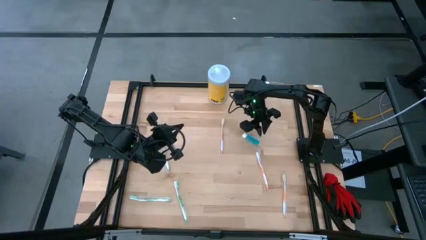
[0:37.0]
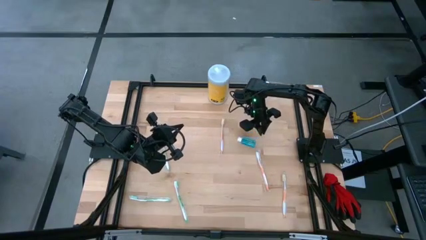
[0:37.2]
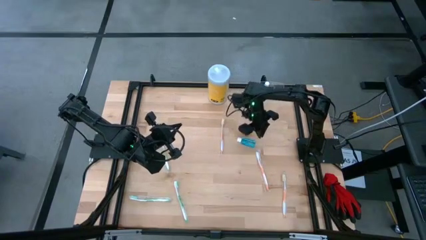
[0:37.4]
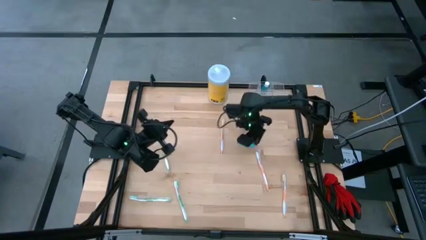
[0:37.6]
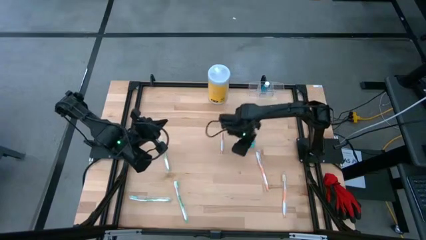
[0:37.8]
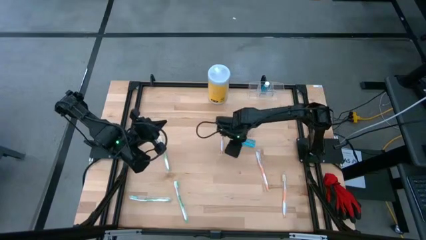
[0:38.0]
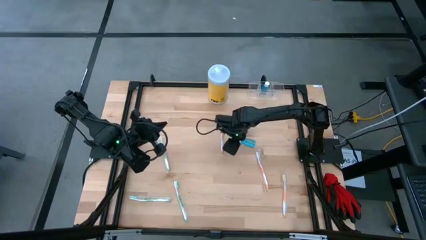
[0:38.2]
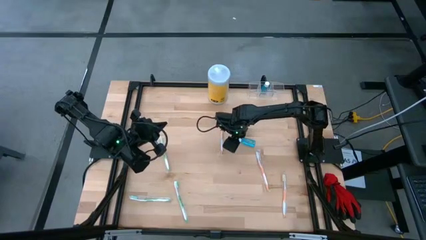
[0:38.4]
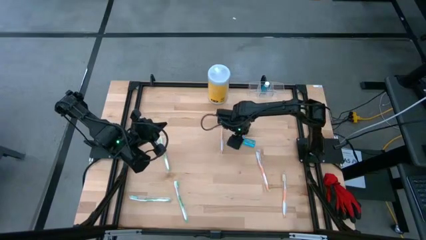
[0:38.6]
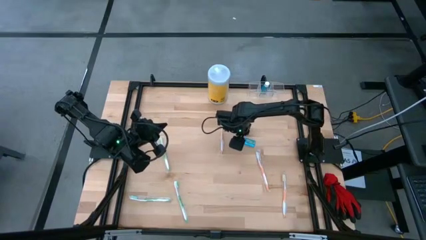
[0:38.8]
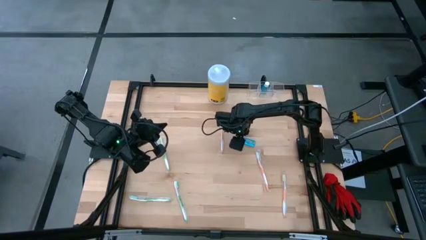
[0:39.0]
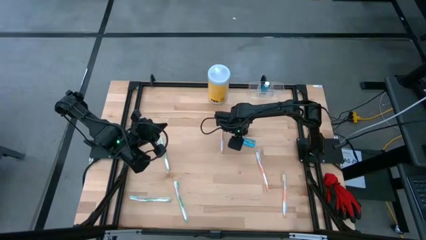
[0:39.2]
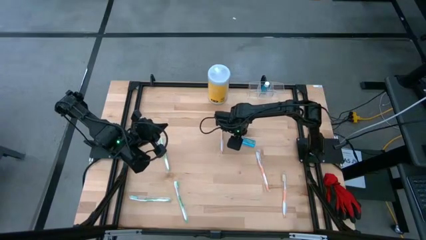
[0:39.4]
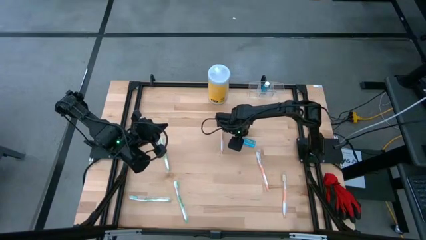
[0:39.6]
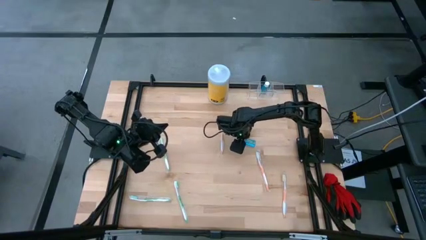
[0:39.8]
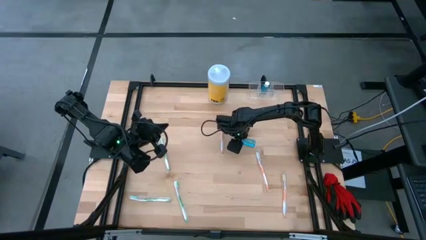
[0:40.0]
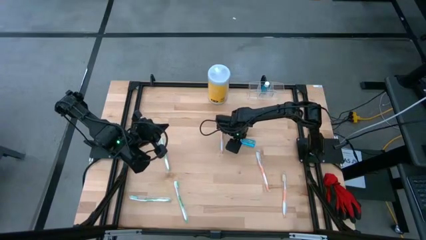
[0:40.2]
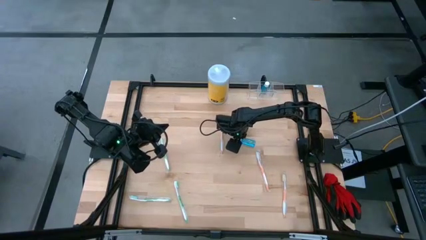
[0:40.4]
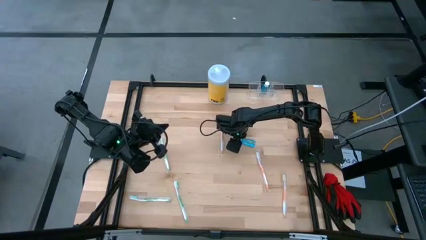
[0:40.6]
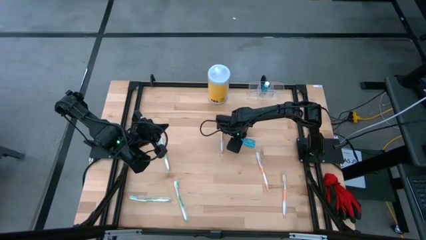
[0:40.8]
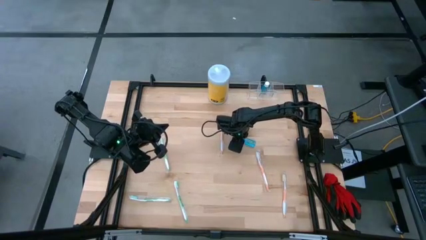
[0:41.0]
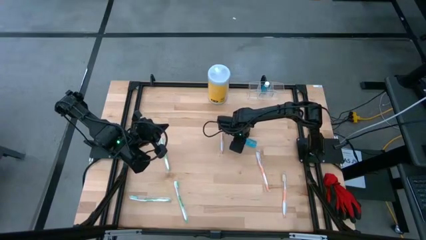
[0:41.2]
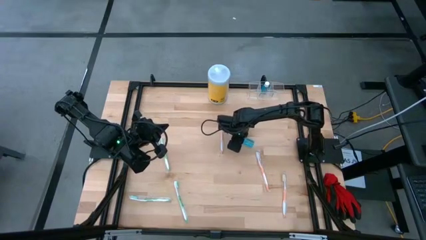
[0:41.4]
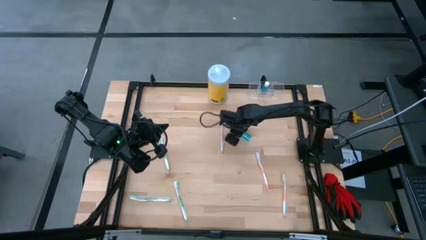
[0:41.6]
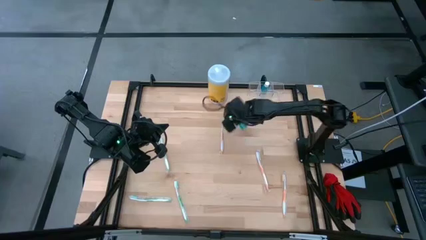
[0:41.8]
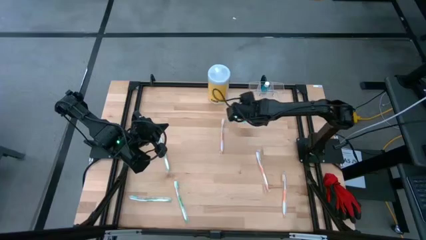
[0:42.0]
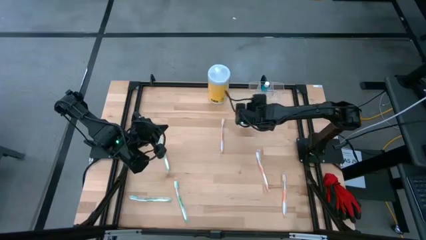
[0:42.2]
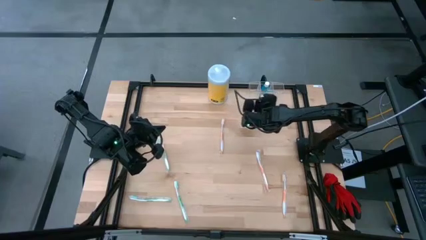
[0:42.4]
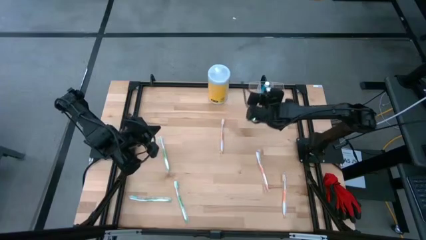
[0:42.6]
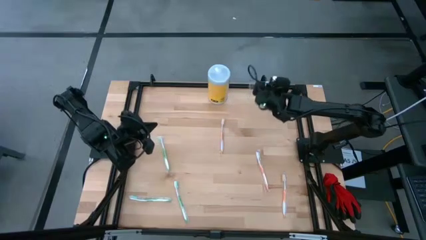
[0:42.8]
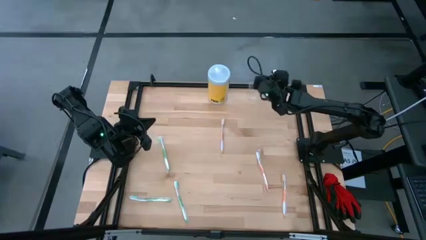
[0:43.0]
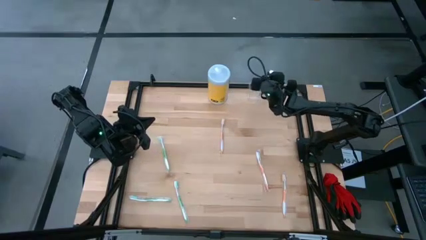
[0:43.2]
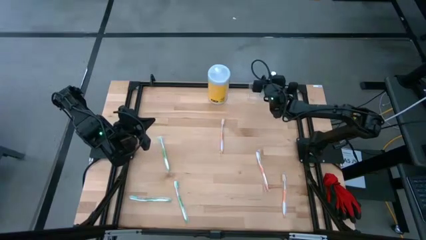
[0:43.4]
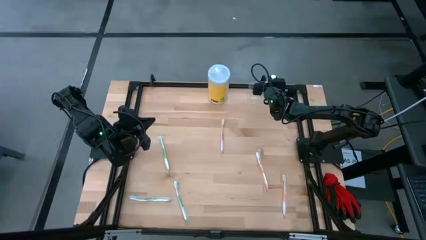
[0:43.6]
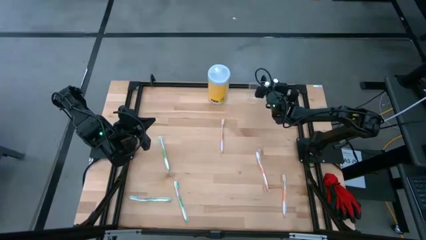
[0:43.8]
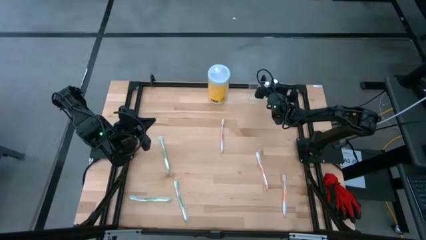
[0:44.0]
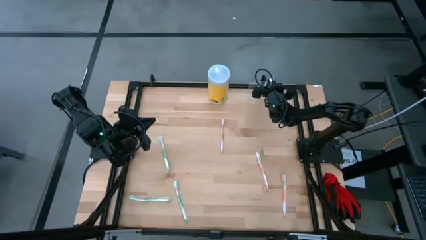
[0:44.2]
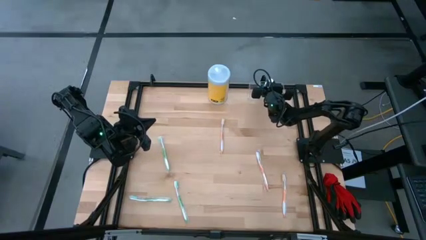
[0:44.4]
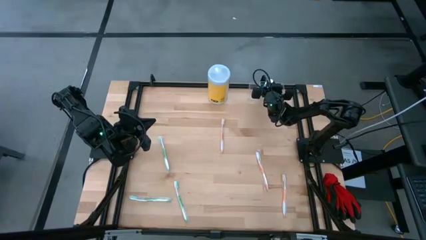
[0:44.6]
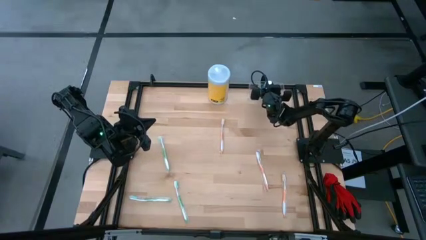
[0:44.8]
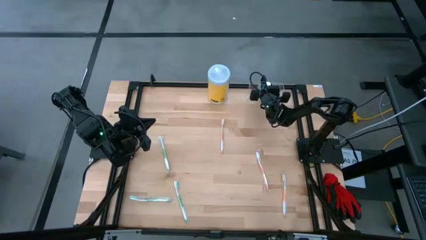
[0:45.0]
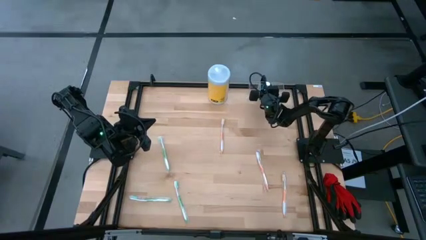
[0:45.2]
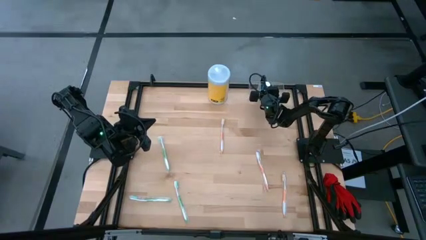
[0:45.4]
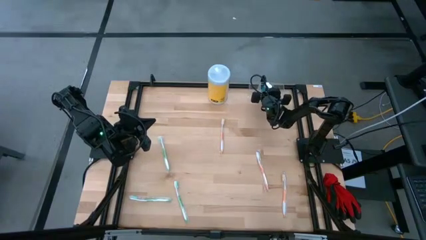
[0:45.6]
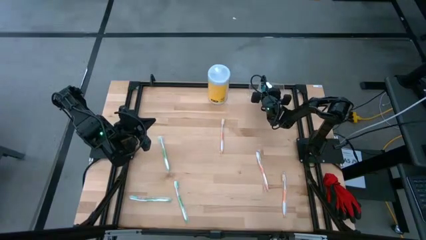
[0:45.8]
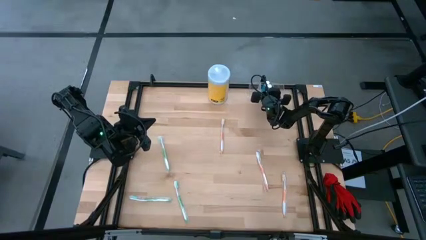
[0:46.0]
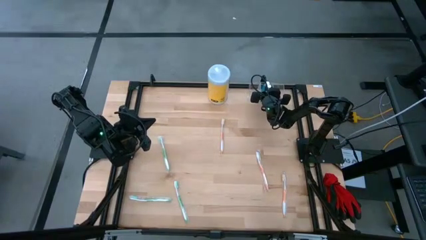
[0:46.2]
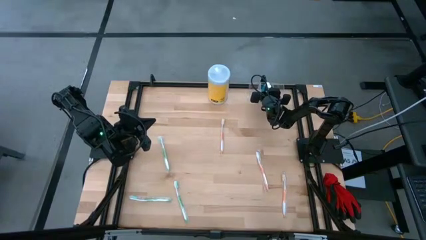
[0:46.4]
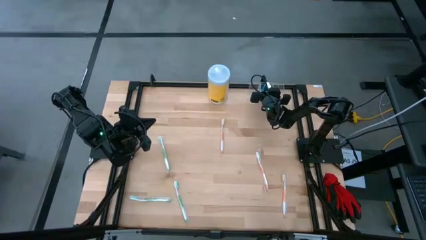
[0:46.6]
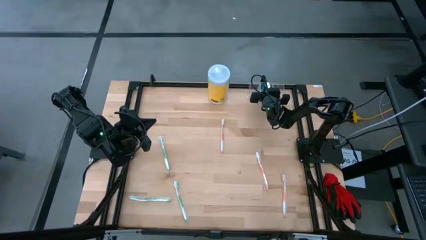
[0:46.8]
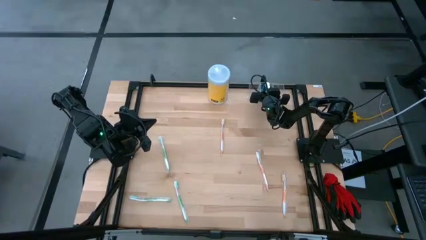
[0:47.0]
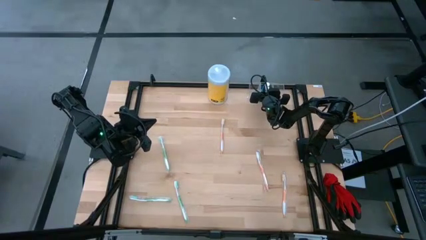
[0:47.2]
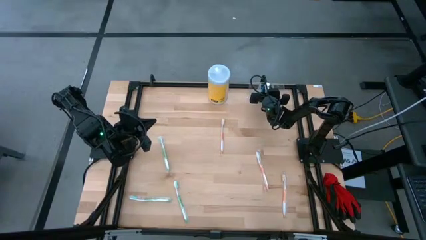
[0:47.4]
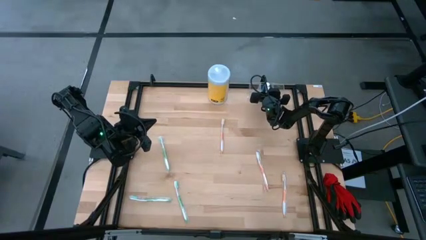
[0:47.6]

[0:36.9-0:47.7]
Task: Pick & Place toothbrushing station
Put the blue mouthwash into the transparent organizer

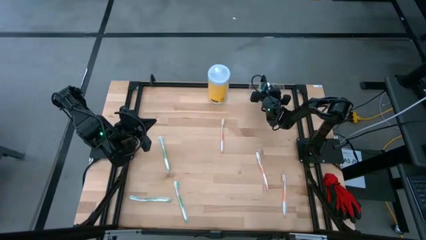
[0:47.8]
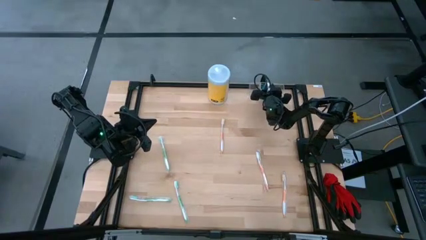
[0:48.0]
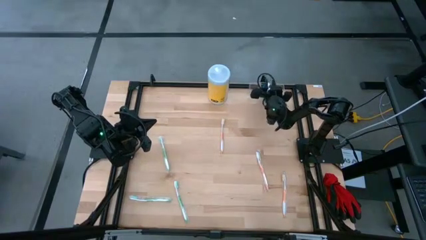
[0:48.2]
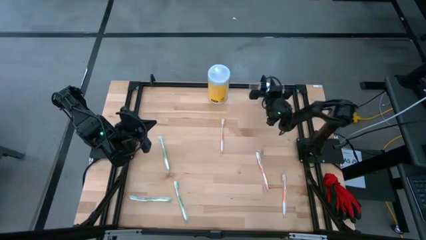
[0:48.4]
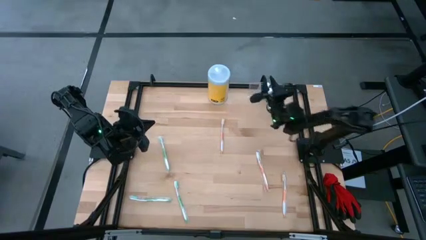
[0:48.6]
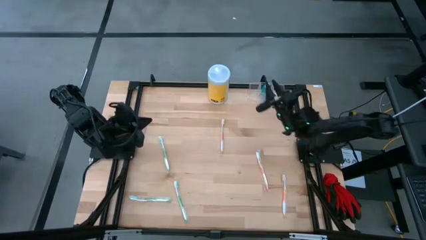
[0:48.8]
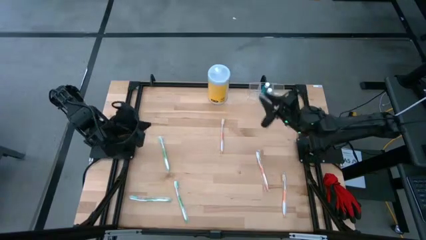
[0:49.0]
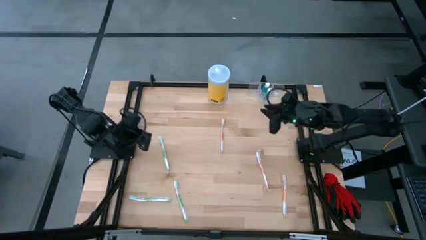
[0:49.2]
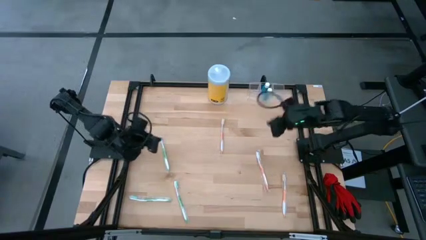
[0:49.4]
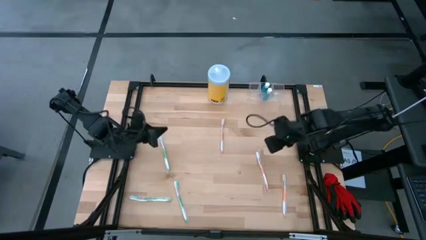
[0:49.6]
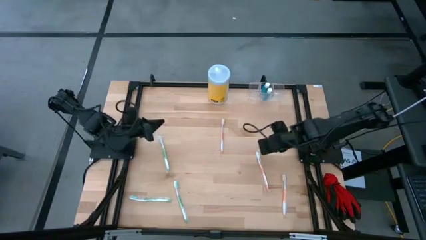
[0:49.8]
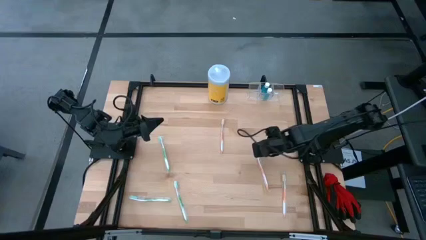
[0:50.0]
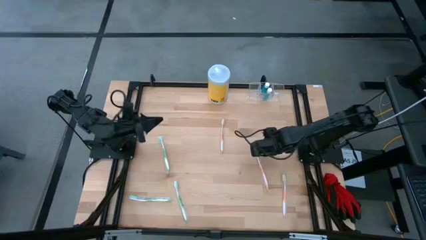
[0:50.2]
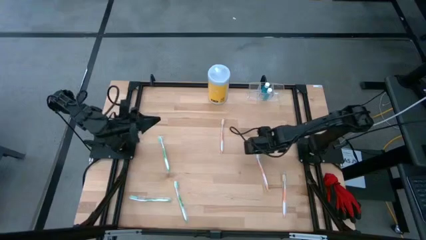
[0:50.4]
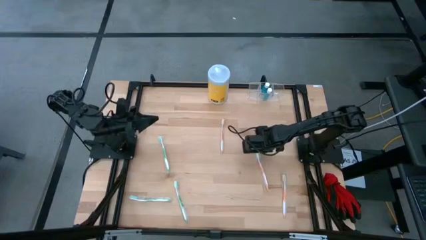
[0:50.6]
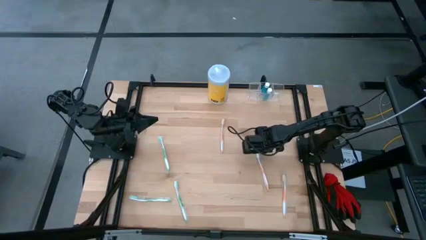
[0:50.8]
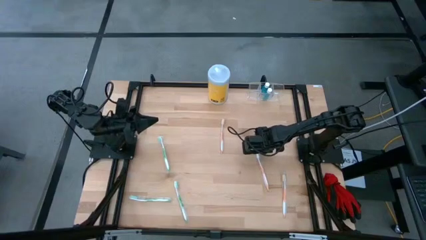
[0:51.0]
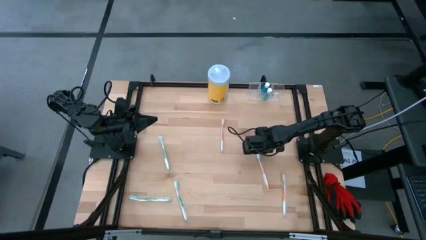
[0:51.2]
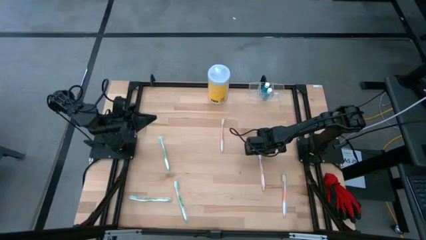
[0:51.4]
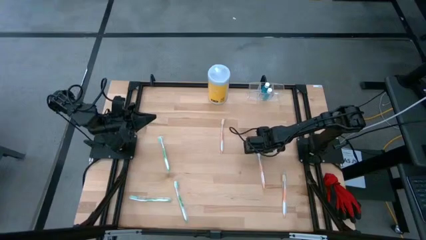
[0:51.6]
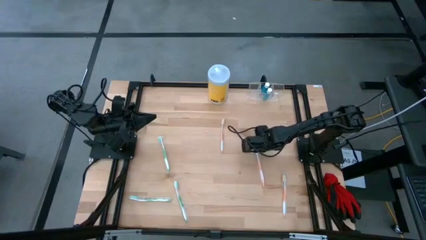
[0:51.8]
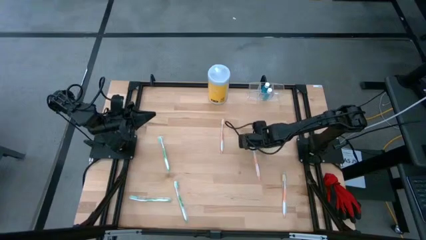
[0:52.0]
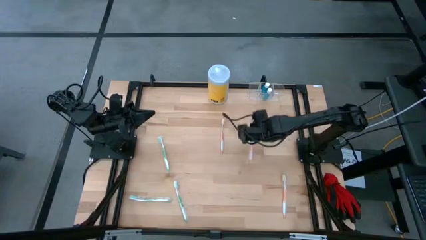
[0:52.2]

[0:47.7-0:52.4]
Put the middle orange toothbrush into the transparent organizer

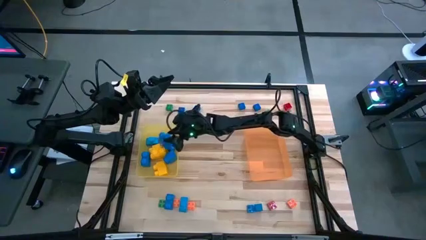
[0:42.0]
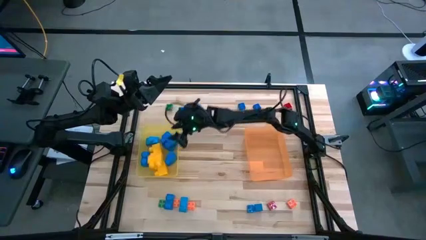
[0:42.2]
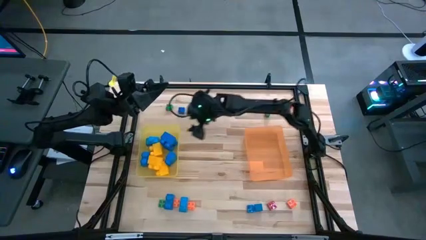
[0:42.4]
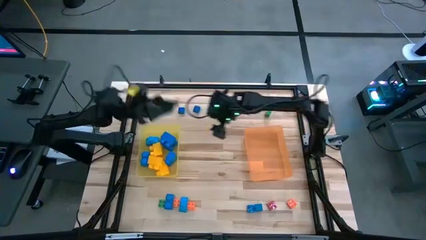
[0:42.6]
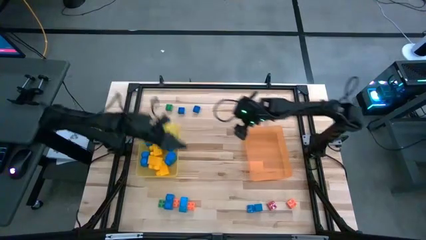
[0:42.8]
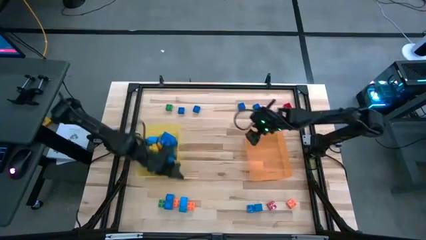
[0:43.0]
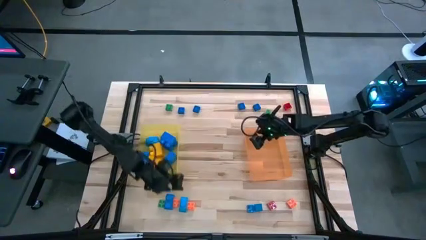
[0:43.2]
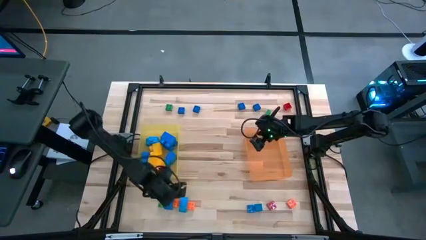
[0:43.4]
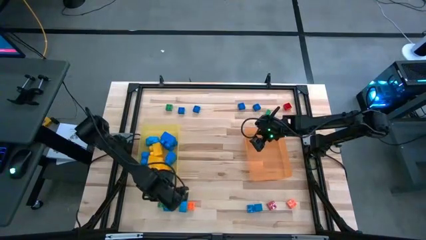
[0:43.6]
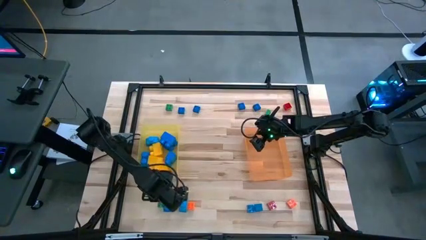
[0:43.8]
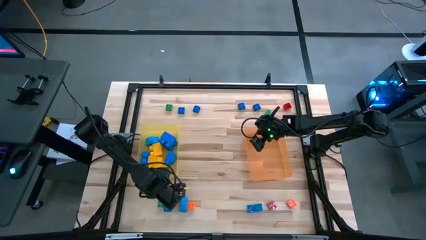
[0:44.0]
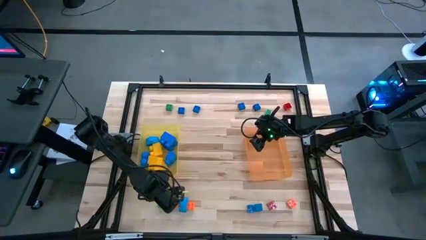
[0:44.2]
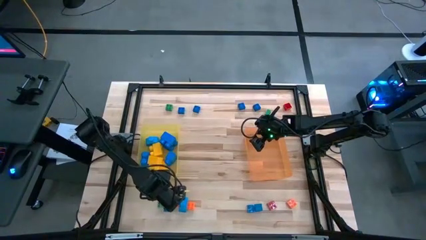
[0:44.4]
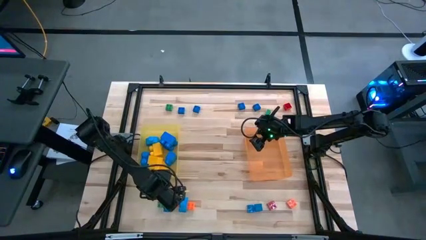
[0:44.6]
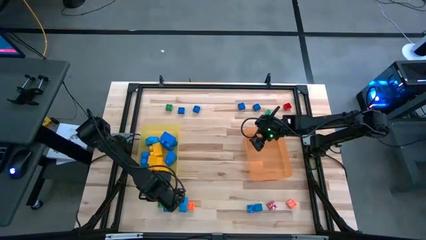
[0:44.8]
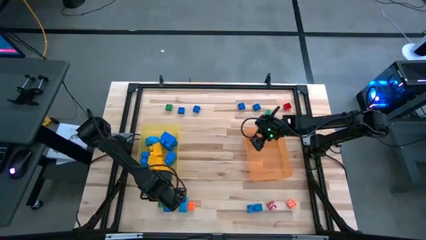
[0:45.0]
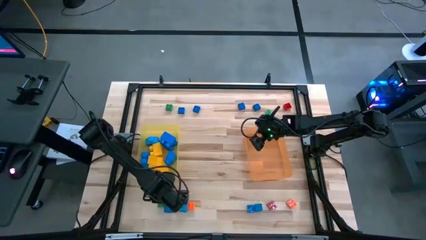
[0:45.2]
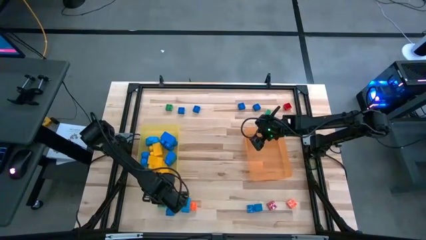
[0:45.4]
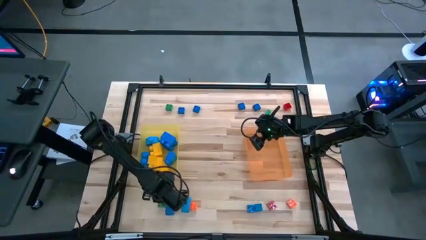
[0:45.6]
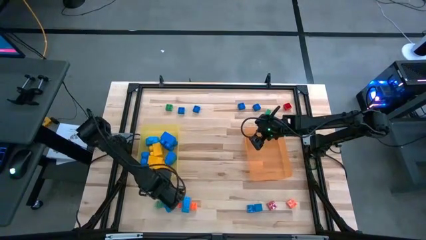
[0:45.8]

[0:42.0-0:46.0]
Task: Sort blocks by size
Put the large blue game piece into the yellow bin
